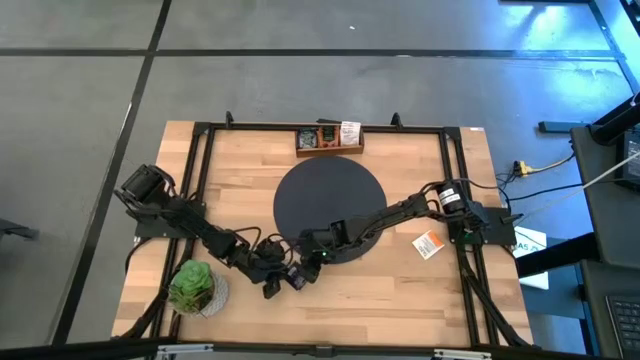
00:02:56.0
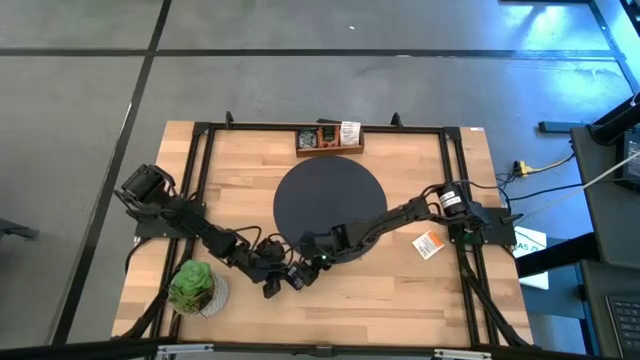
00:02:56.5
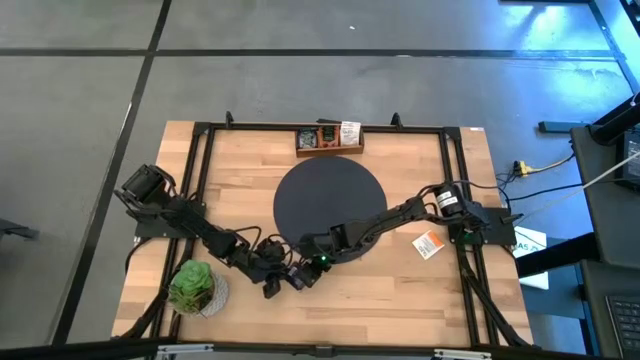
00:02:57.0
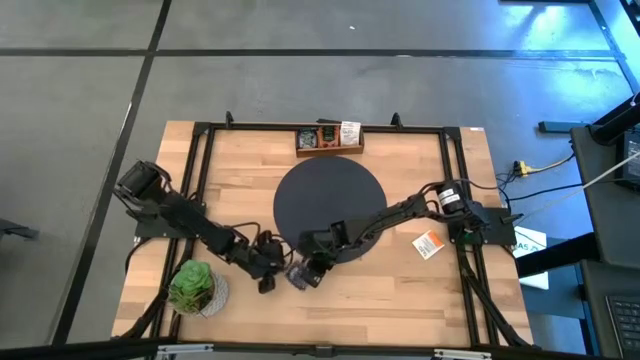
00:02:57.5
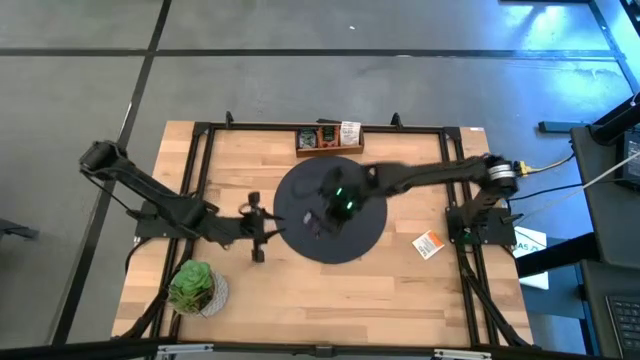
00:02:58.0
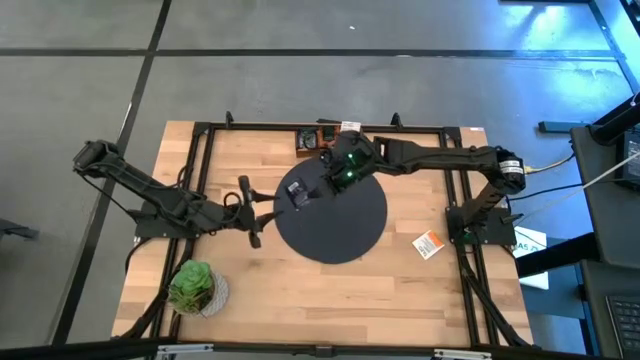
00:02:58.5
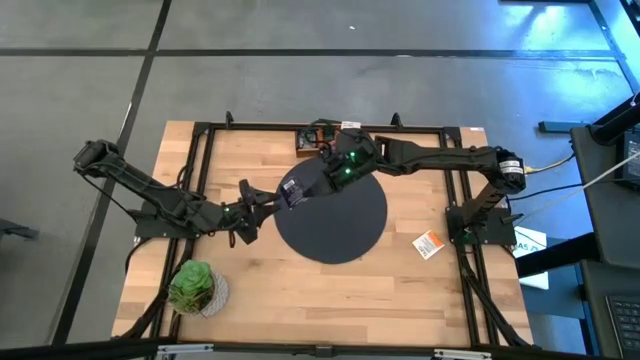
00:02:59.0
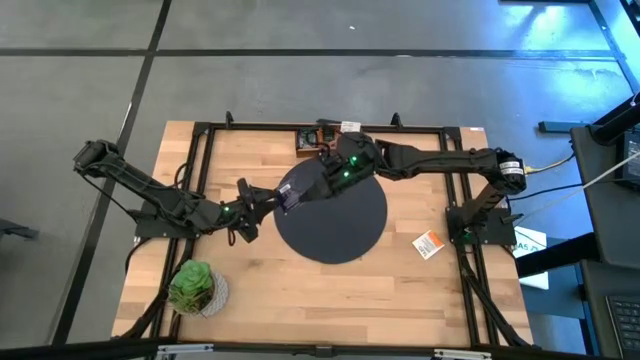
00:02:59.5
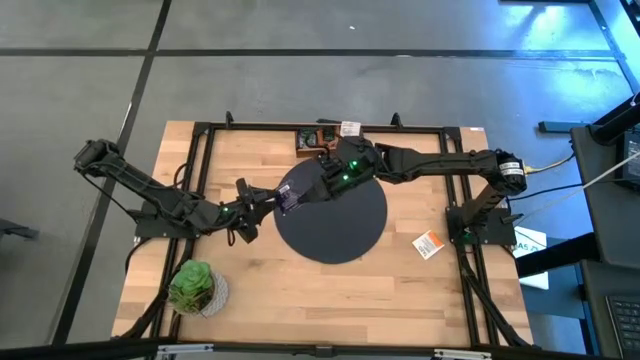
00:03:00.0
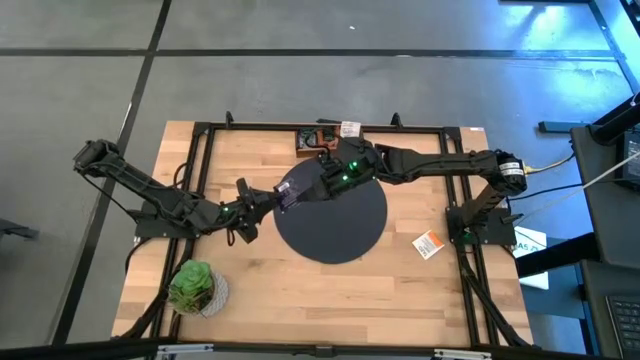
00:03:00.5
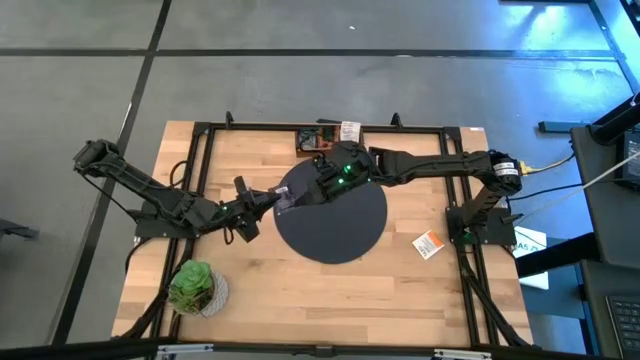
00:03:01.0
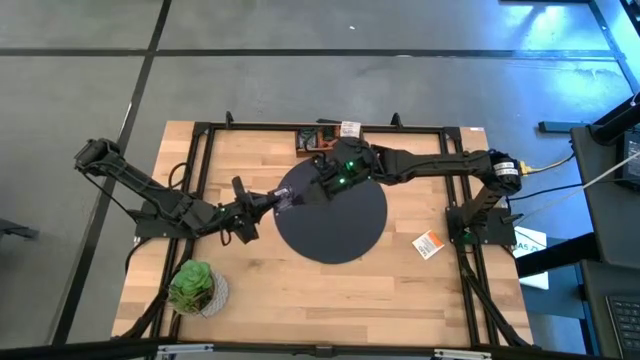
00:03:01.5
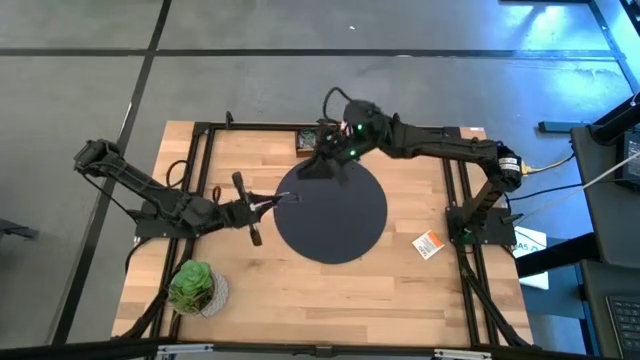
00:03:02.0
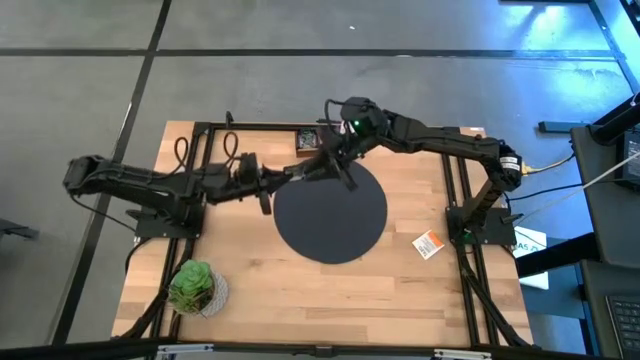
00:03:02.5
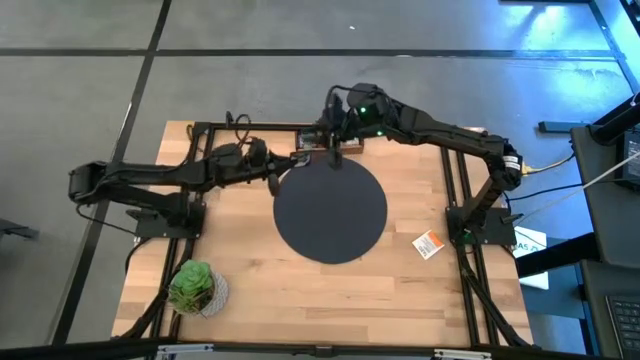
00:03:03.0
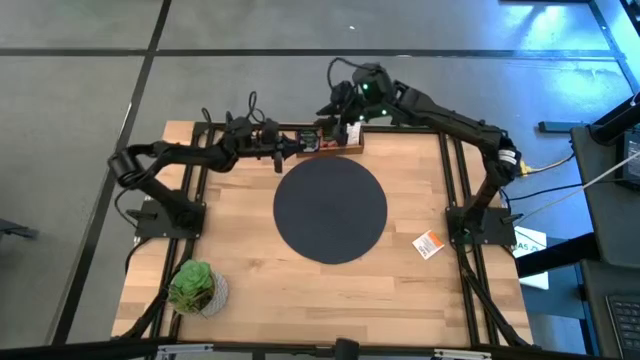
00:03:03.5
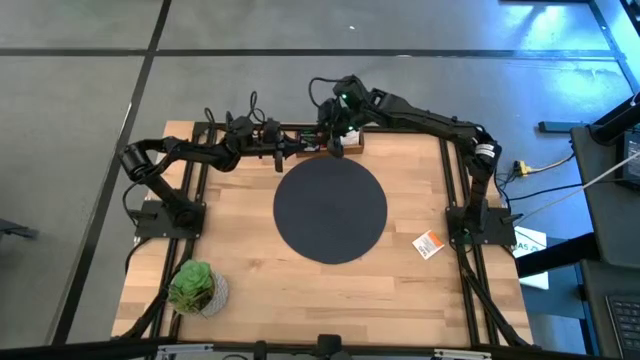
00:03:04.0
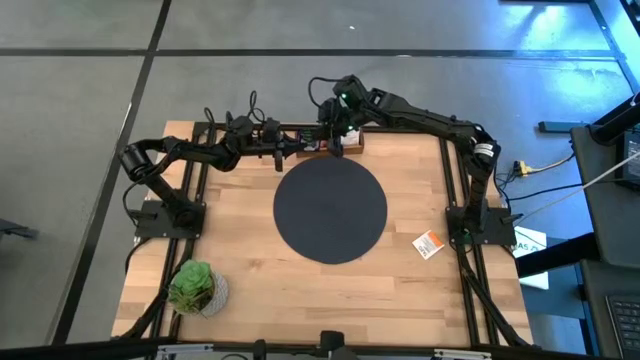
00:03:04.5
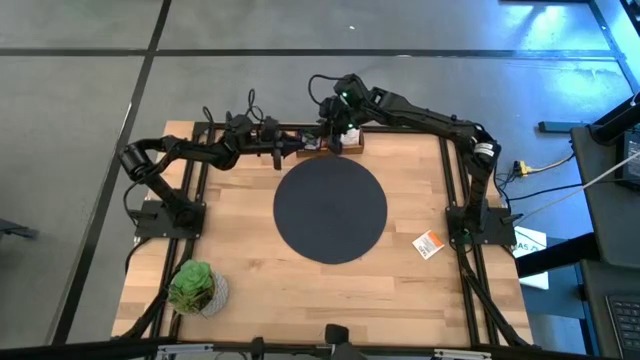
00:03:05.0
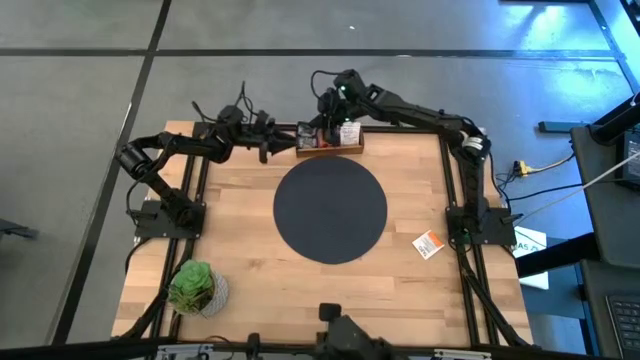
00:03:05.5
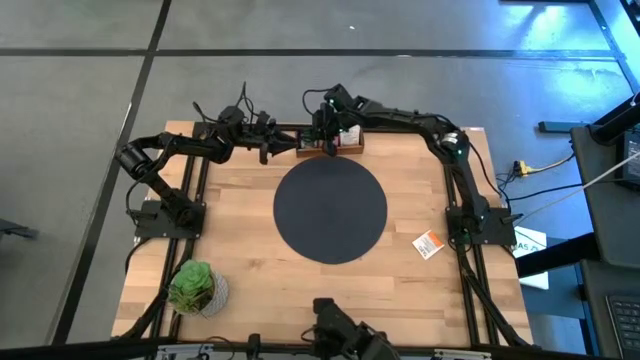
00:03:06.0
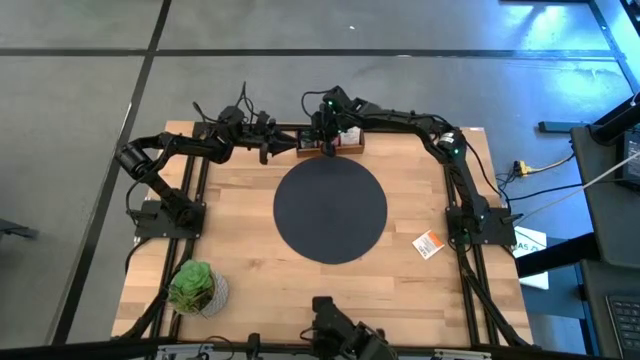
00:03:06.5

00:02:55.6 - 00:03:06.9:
Task: Pick & Place Tea
Put the purple tea bag into the left section of the wooden organizer

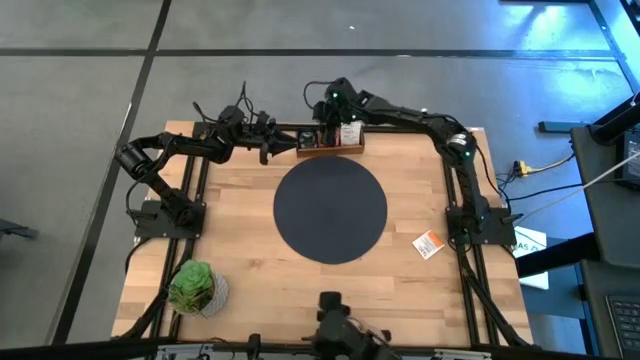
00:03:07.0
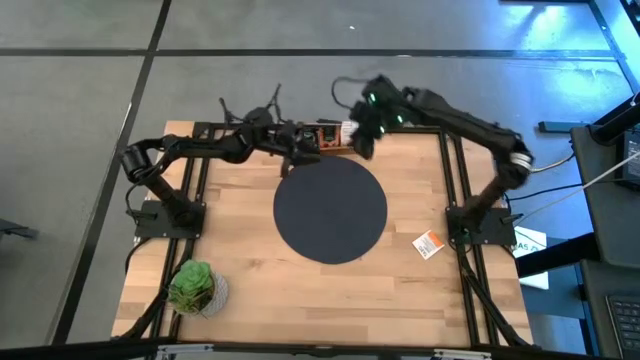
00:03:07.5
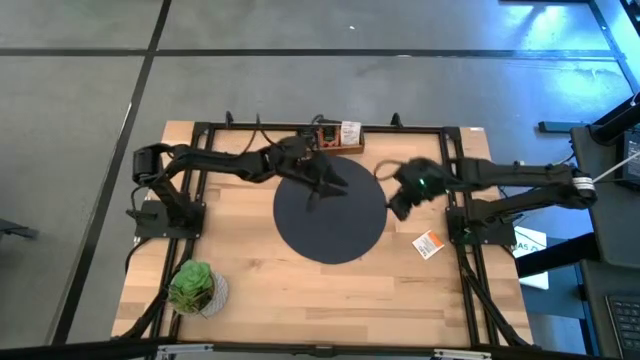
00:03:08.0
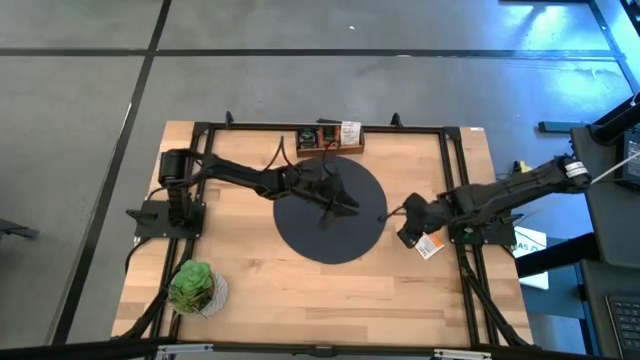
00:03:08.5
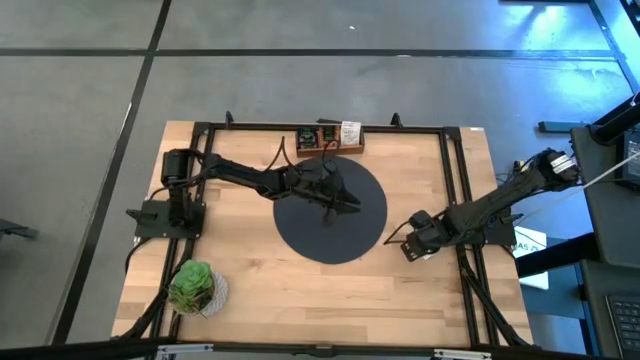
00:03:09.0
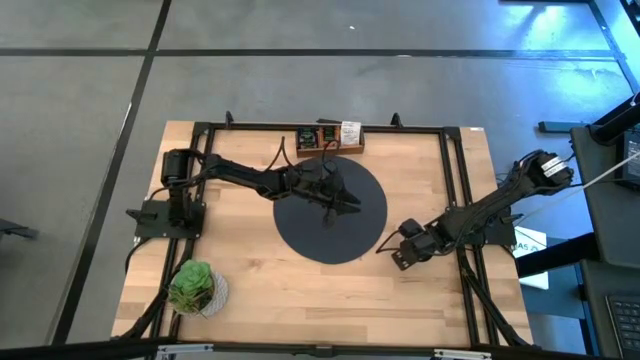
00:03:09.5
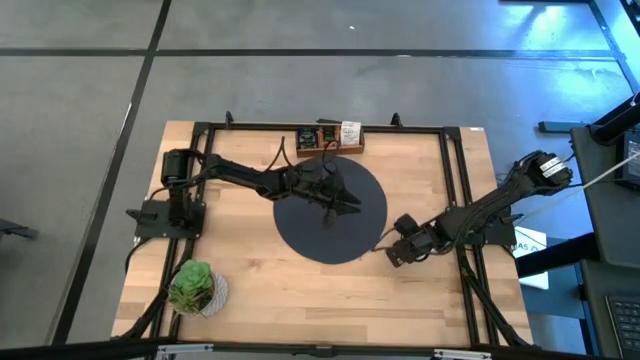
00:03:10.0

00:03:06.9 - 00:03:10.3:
Put the white tea bag into the right section of the wooden organizer

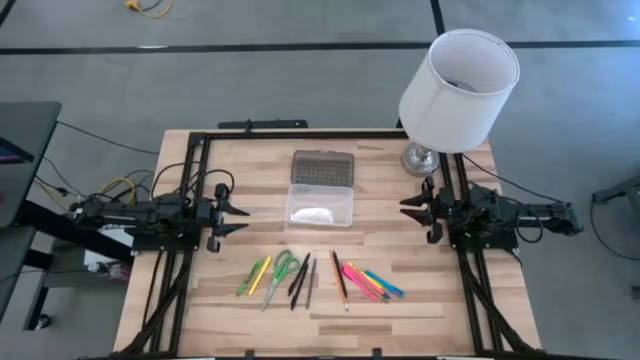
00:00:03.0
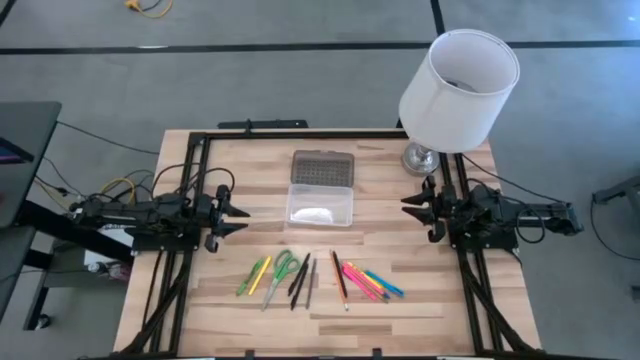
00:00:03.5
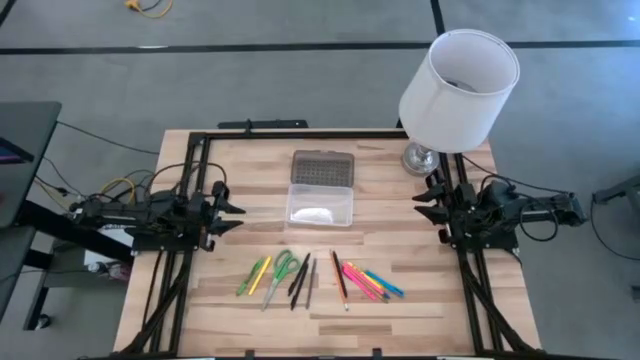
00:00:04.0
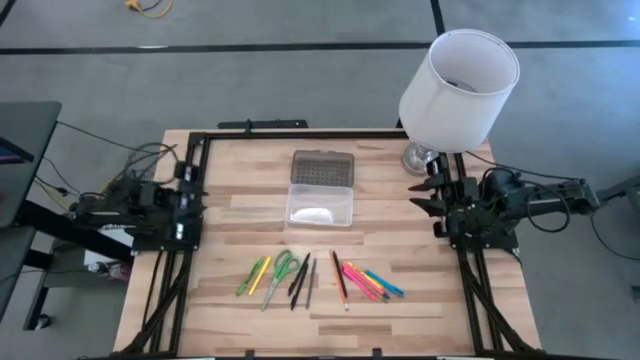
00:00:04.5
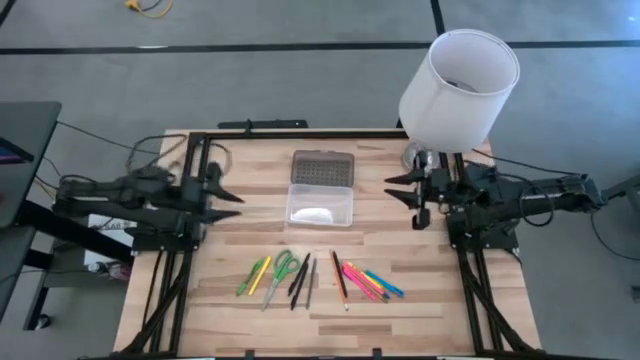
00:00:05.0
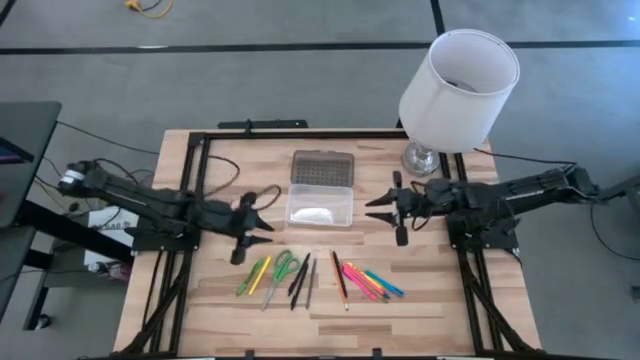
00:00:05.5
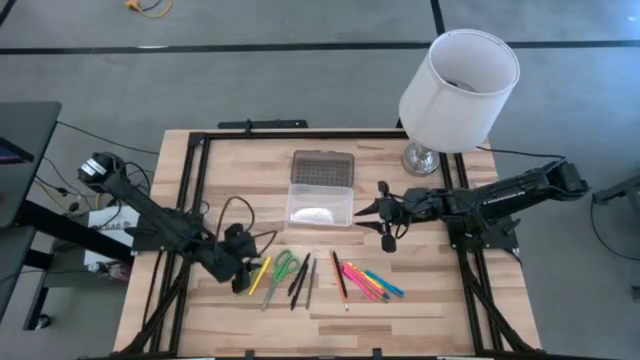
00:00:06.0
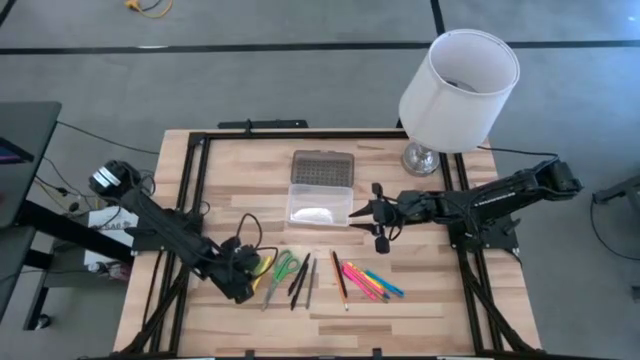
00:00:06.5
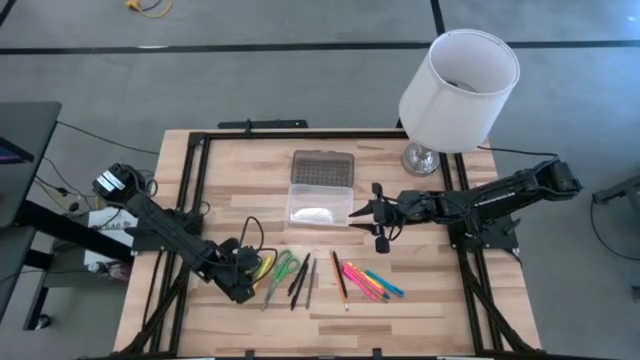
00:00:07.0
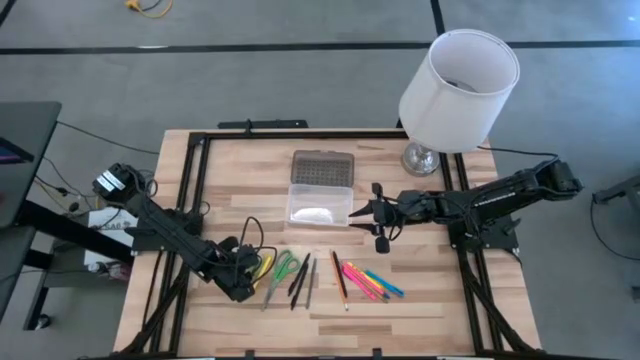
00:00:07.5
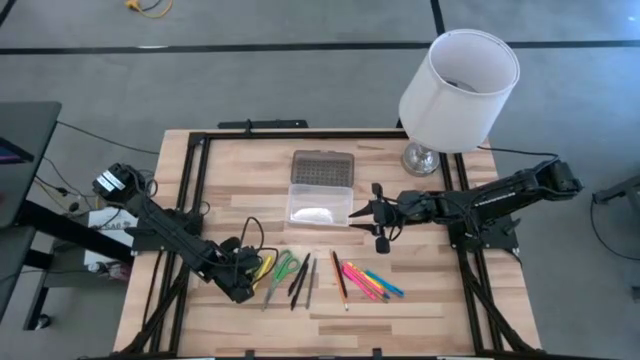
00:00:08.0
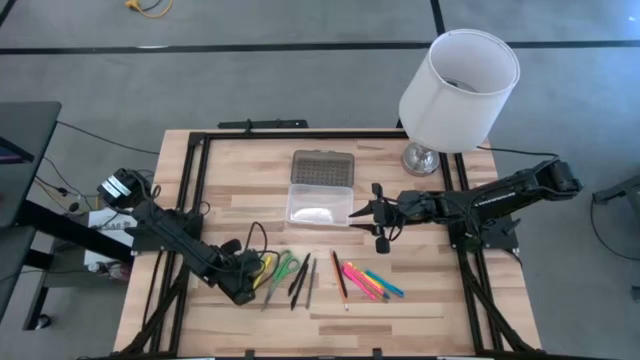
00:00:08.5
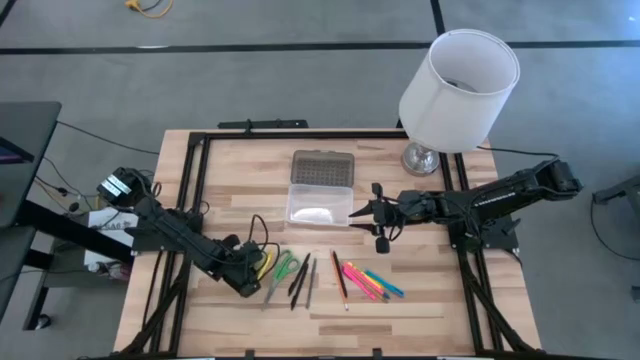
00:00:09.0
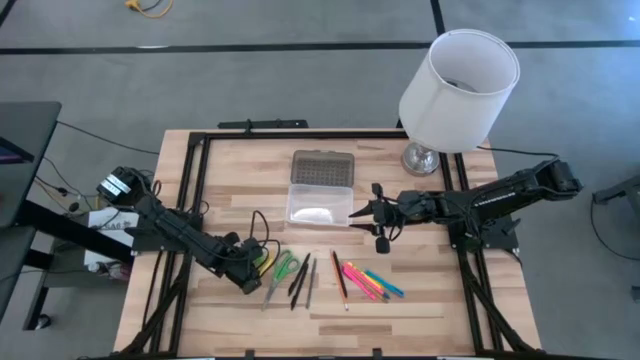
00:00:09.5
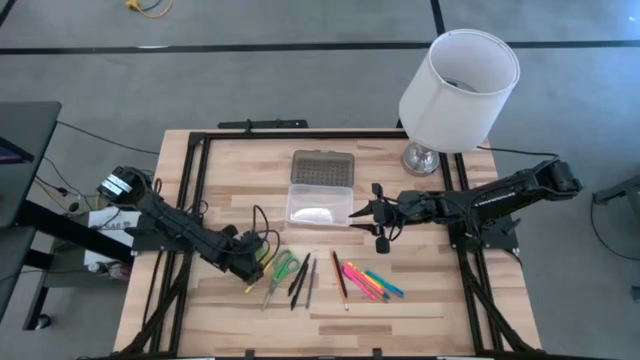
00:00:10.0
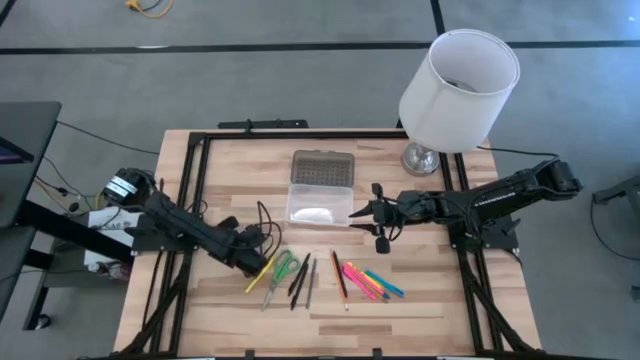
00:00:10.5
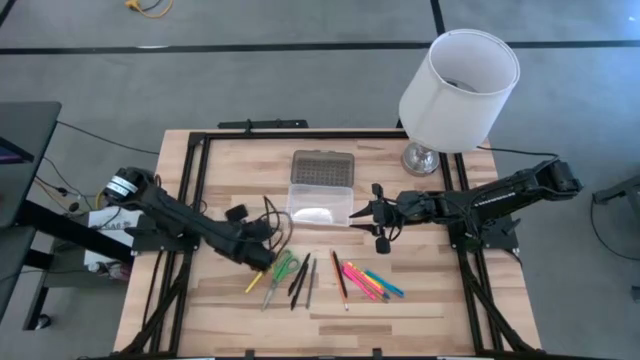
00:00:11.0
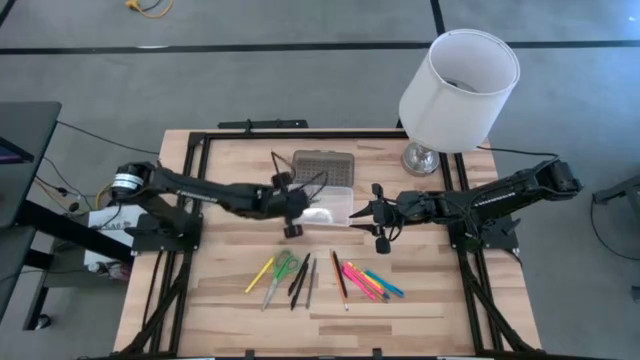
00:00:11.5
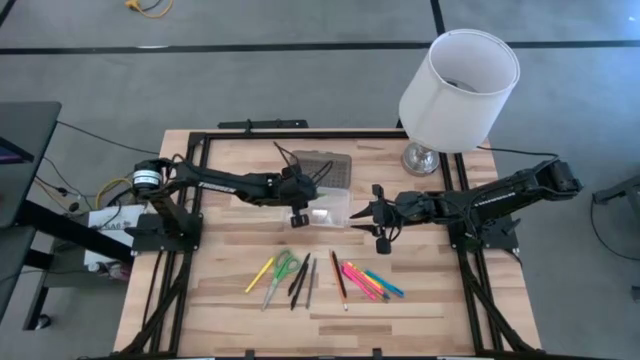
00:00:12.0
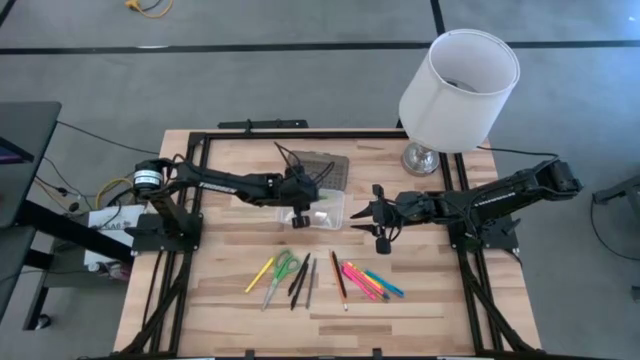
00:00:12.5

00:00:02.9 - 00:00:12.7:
Task: Pick & place school supplies into a supply box
Put the green pen into the black supply box
